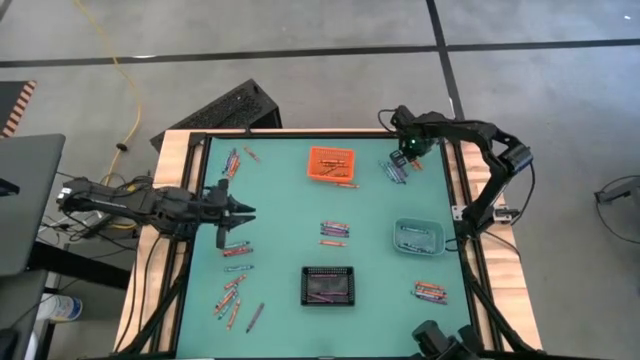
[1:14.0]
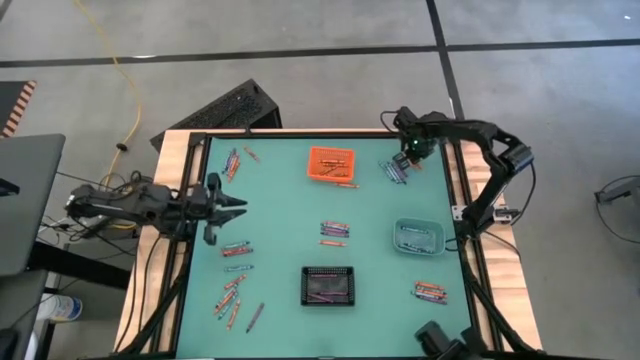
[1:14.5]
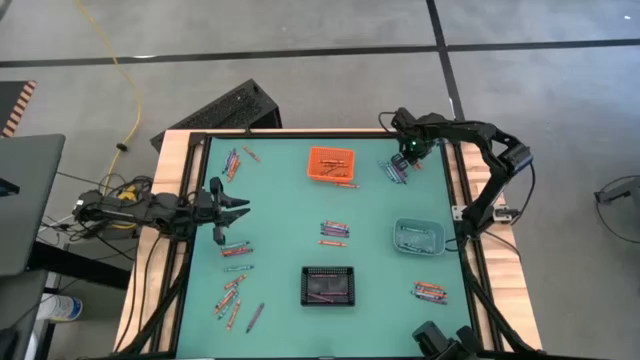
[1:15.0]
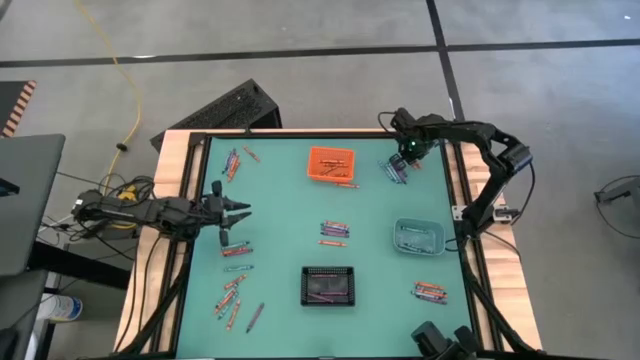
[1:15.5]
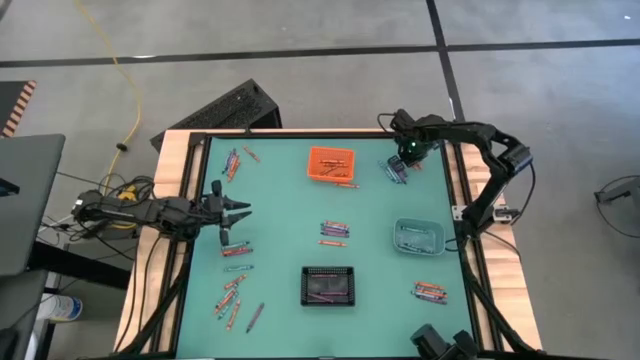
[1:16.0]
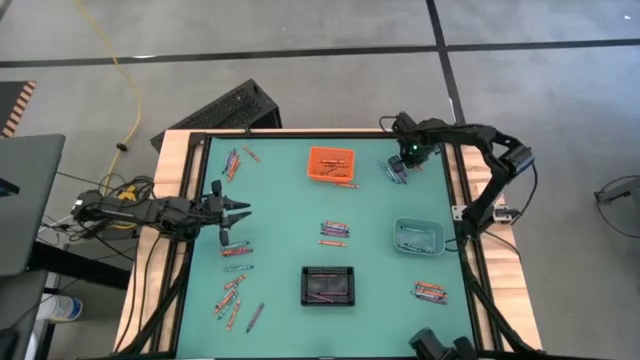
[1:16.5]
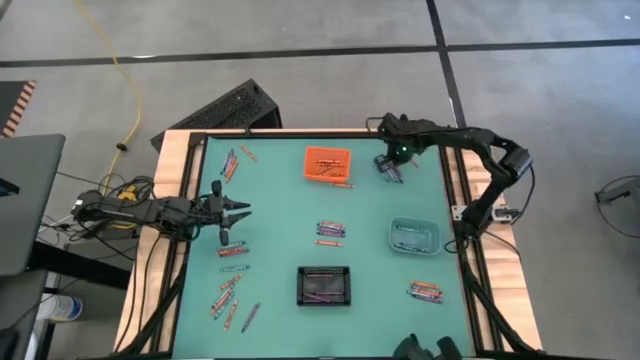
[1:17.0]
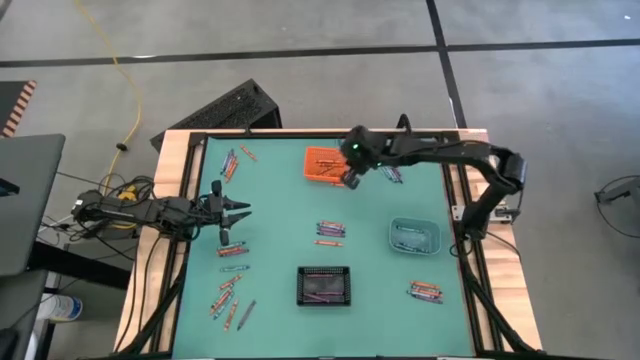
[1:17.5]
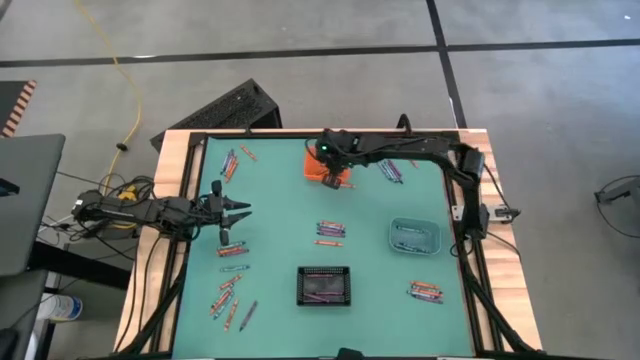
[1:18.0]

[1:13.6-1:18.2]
Task: Sort crayons
Put the orange crayon into the orange bin

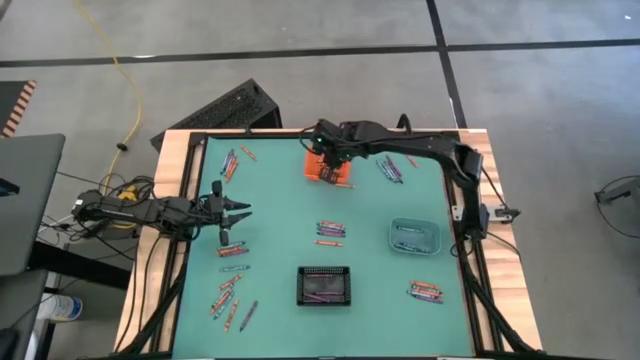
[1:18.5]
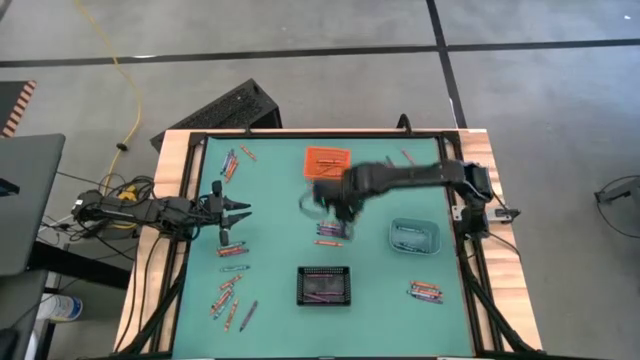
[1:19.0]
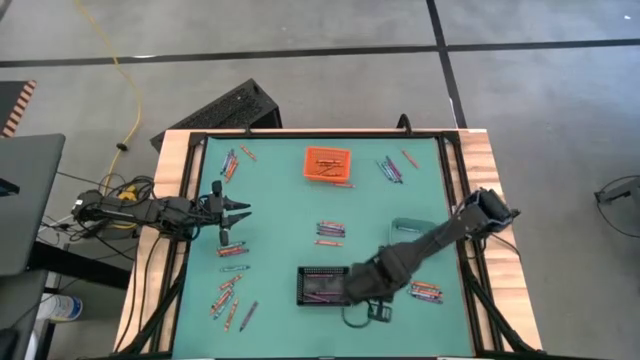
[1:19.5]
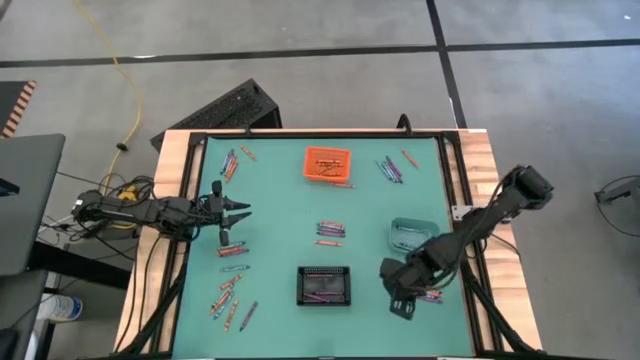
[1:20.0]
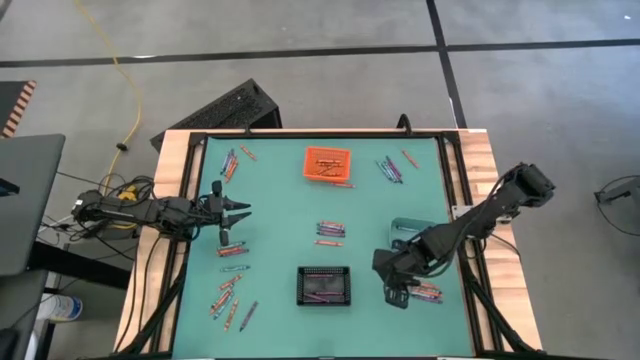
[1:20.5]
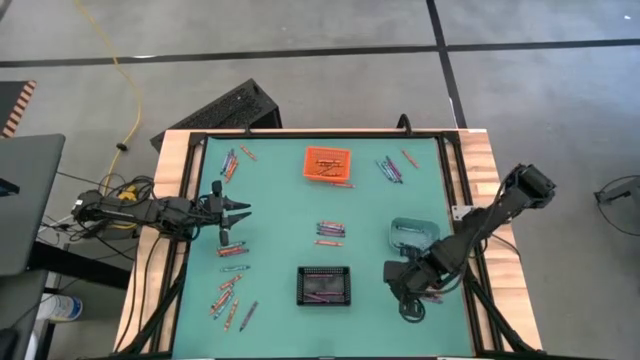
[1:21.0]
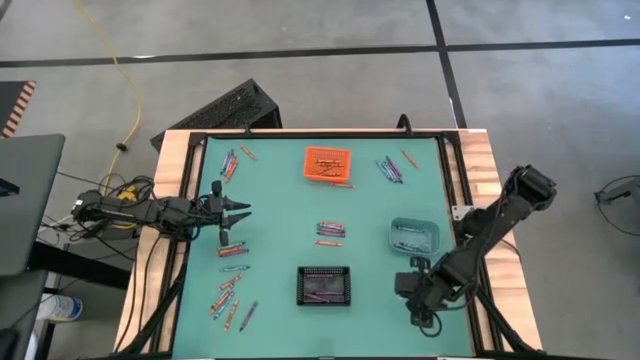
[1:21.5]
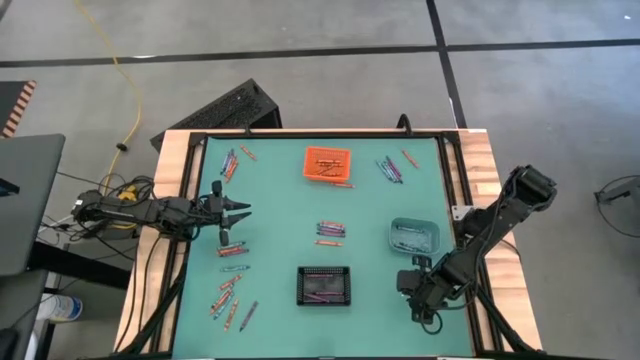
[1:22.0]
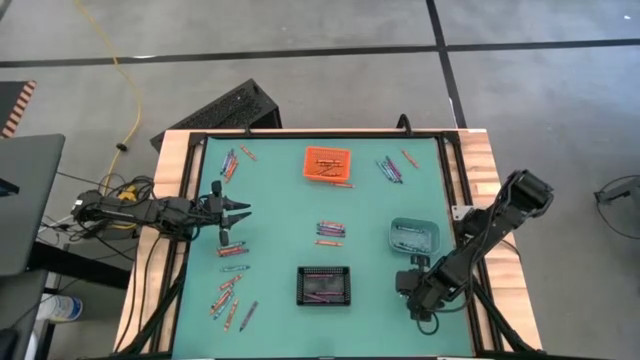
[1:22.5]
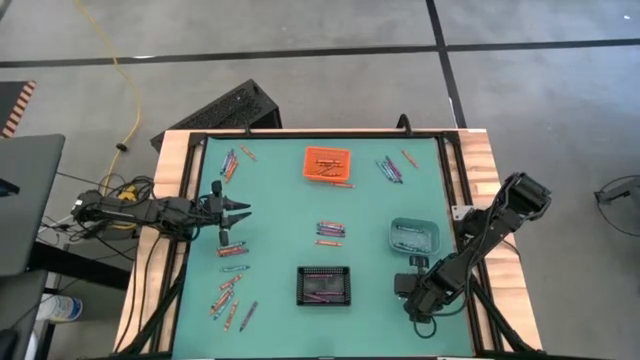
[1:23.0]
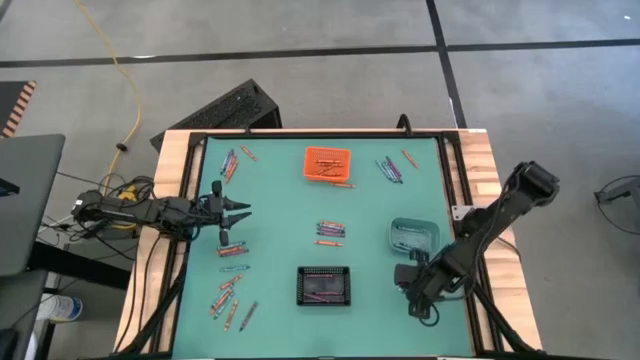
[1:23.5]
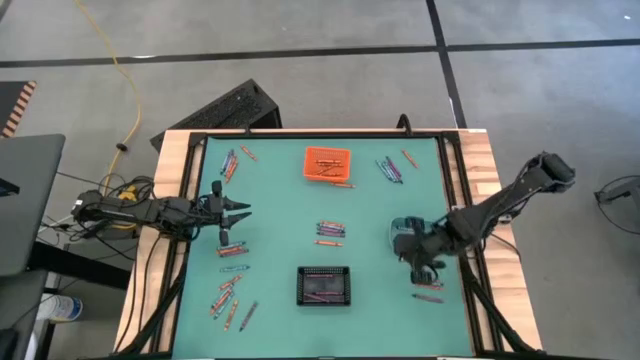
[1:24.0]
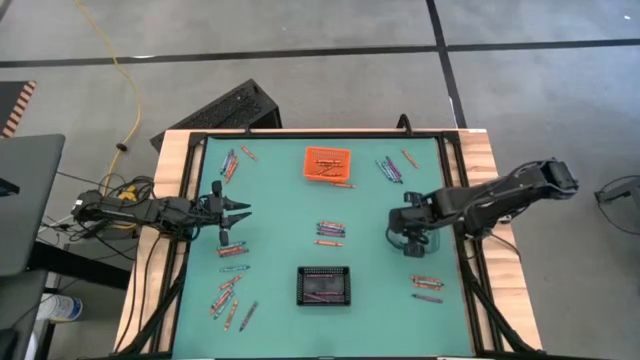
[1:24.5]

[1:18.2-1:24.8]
Put the blue crayon into the blue bin

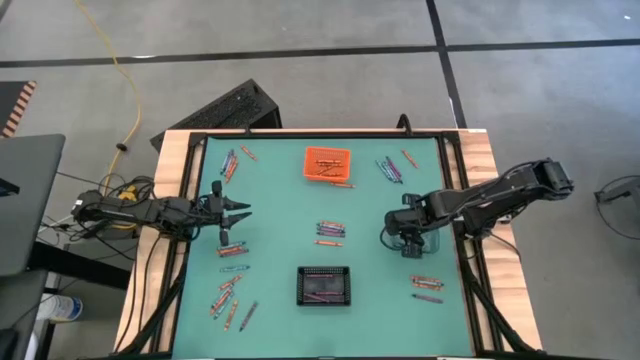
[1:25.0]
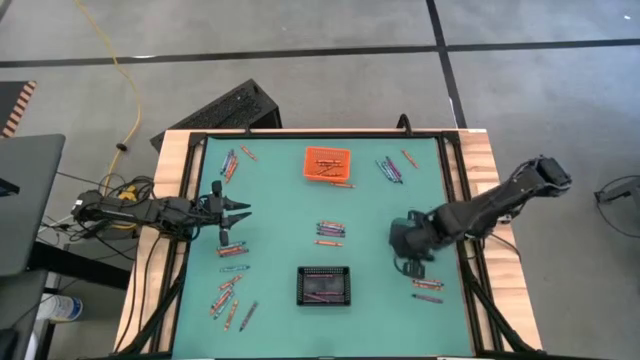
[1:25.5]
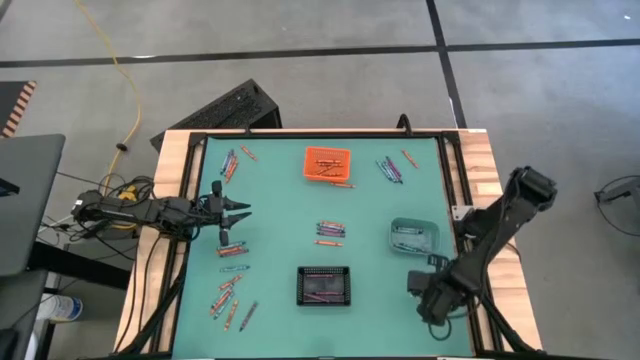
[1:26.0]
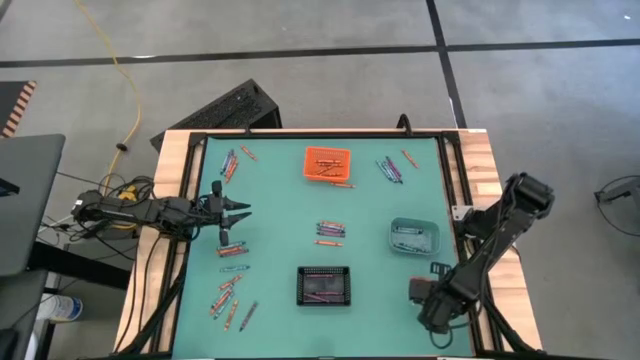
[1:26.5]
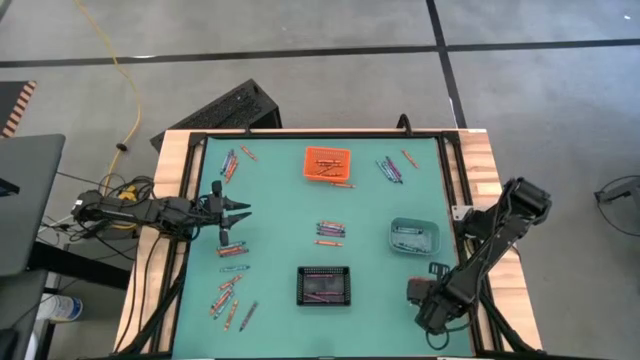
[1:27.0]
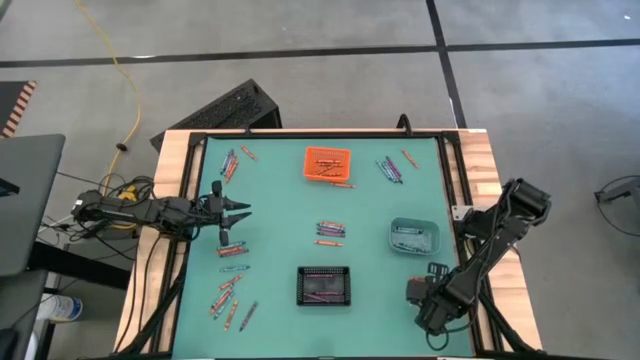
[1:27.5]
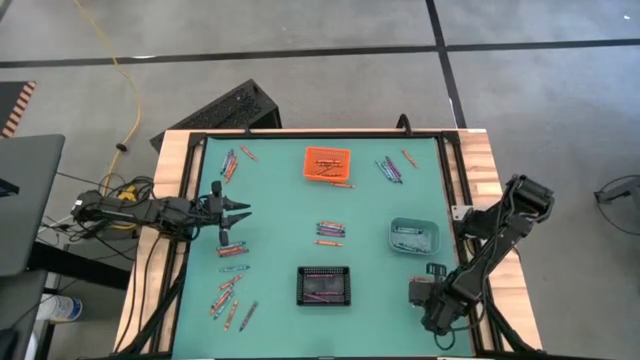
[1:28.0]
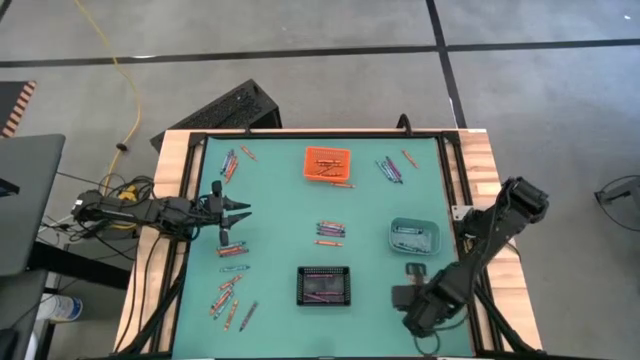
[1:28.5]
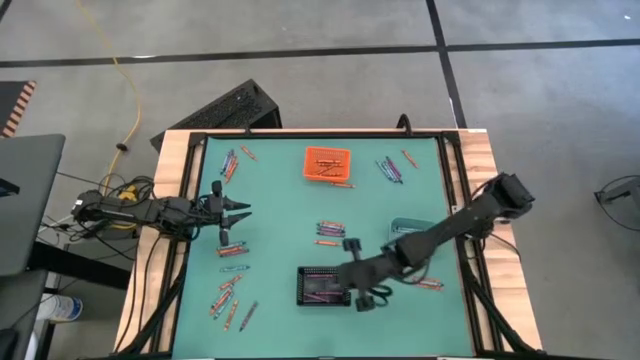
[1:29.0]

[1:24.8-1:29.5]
Put the purple crayon into the black bin

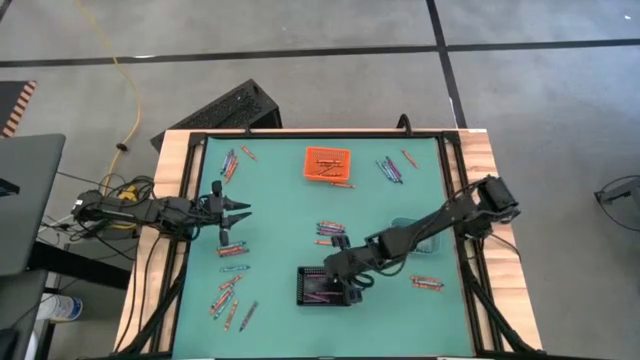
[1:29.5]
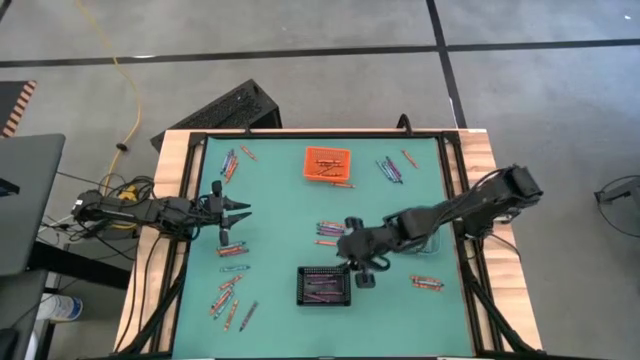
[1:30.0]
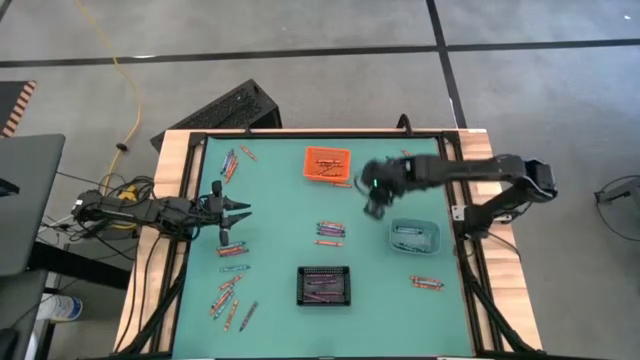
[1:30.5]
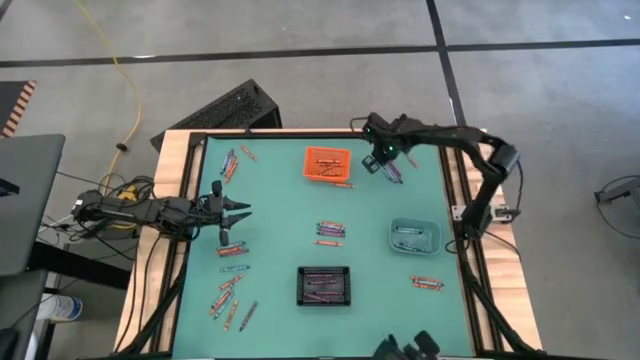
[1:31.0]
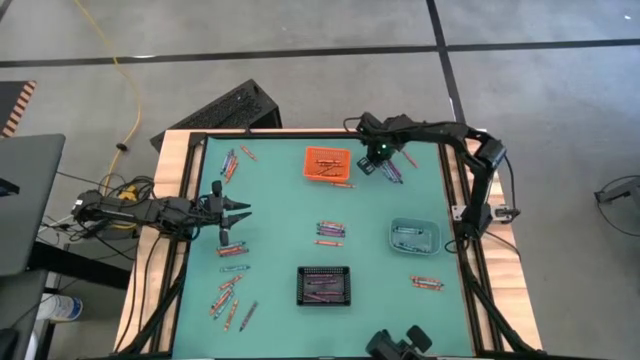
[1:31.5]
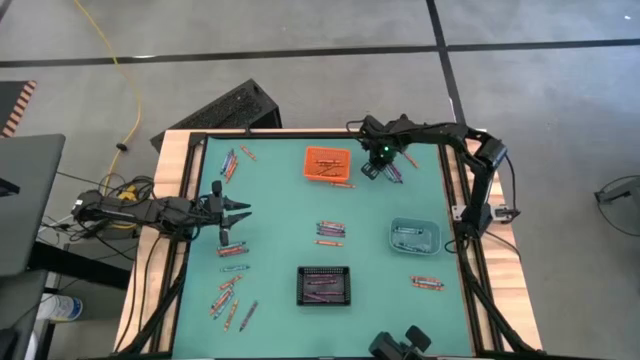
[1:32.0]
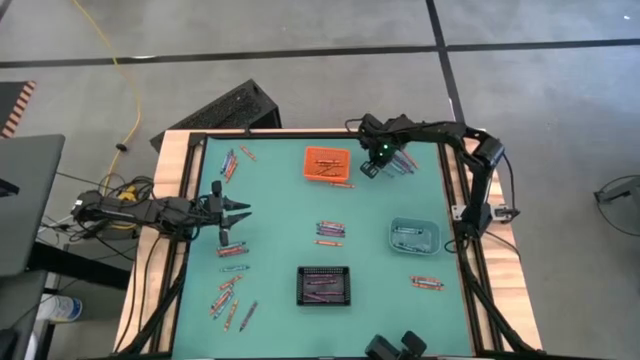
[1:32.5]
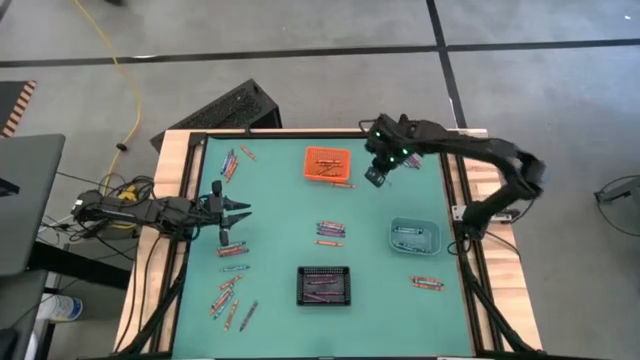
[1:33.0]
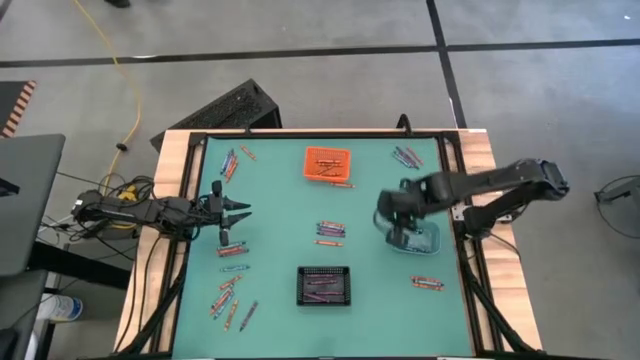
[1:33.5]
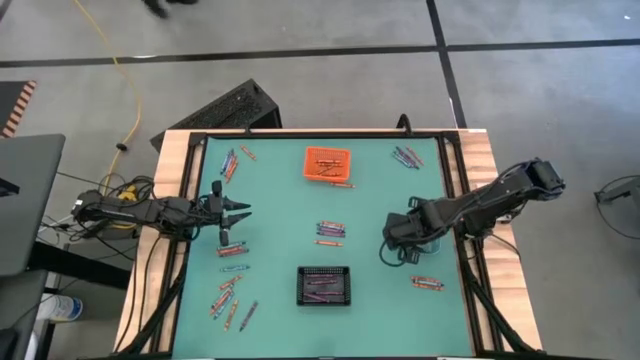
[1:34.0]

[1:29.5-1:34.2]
Put the blue crayon into the blue bin
